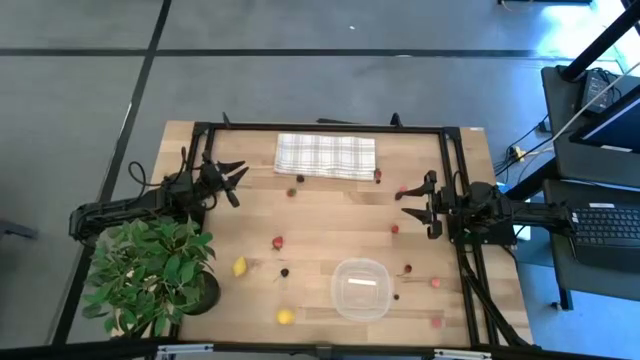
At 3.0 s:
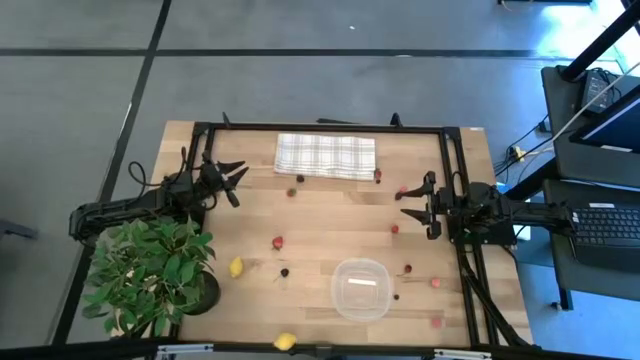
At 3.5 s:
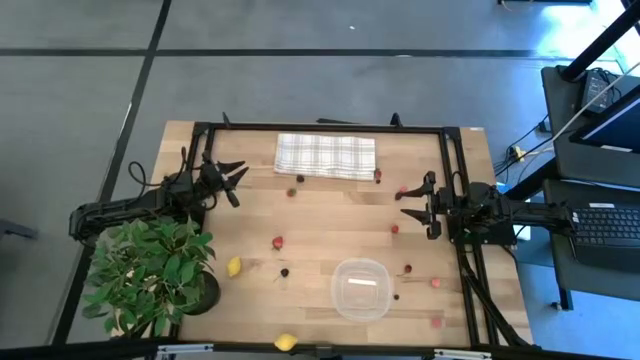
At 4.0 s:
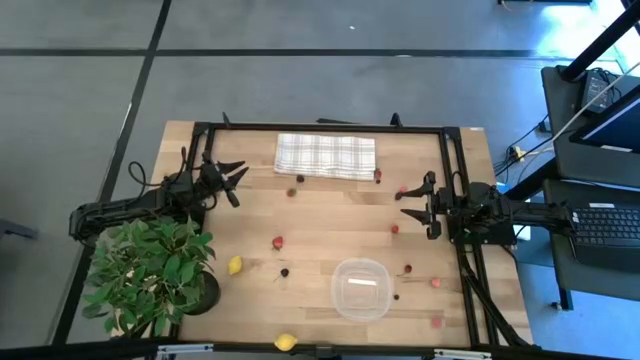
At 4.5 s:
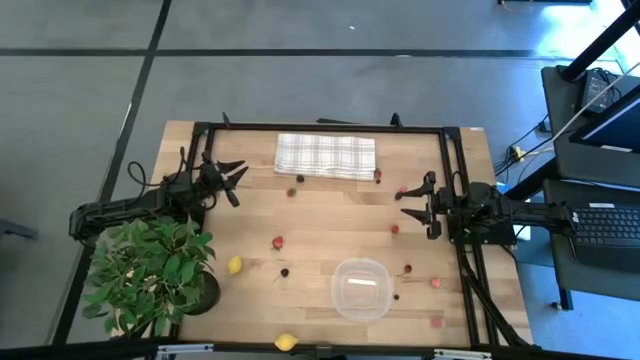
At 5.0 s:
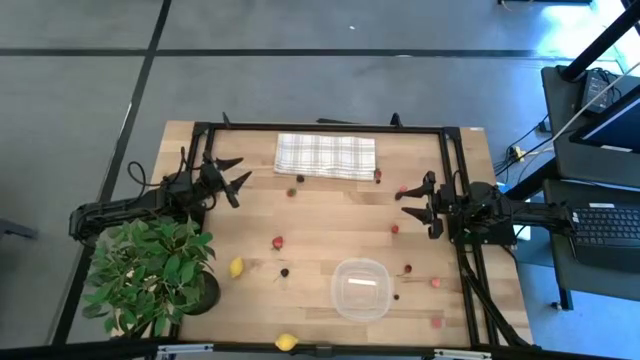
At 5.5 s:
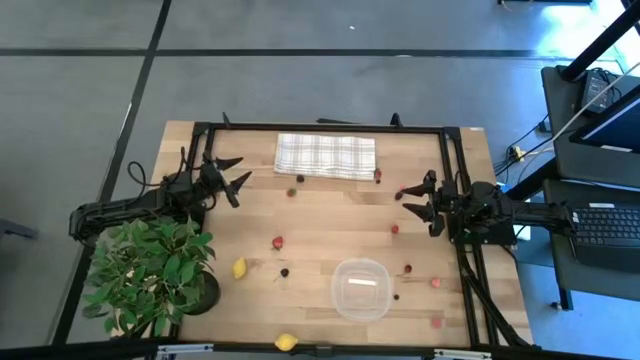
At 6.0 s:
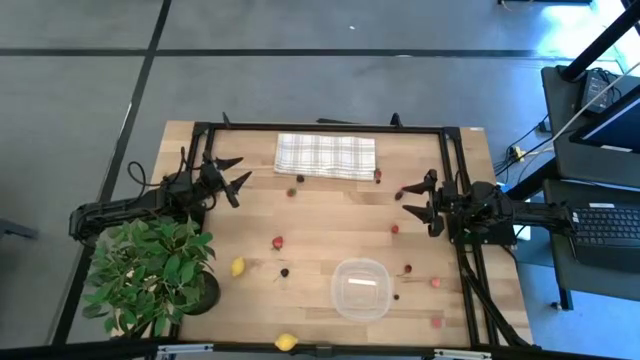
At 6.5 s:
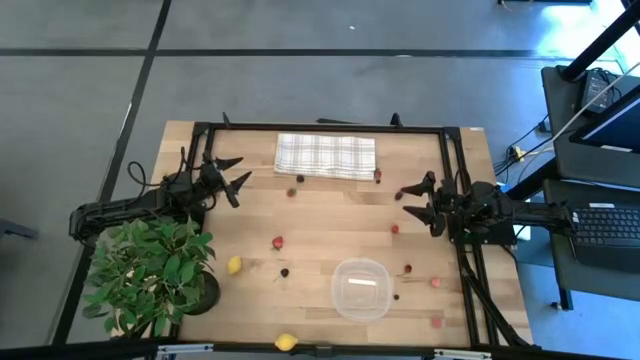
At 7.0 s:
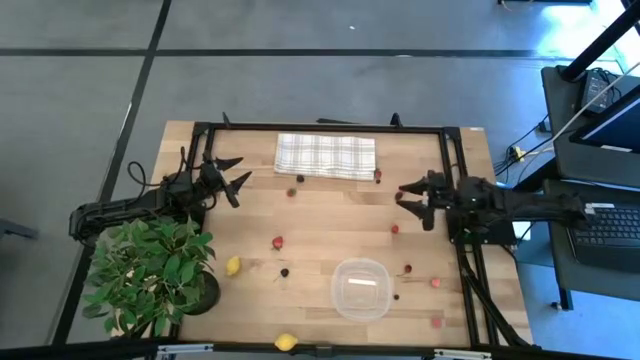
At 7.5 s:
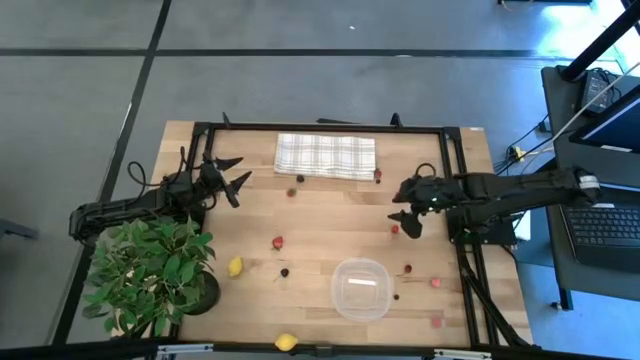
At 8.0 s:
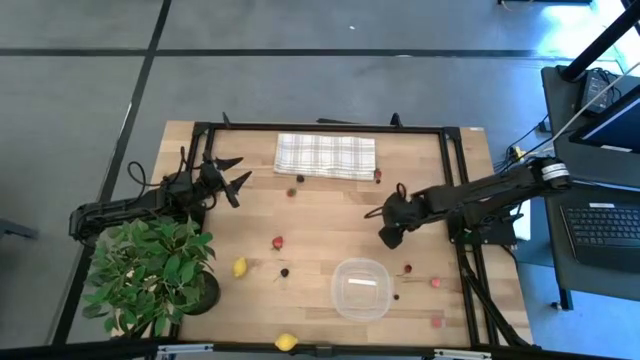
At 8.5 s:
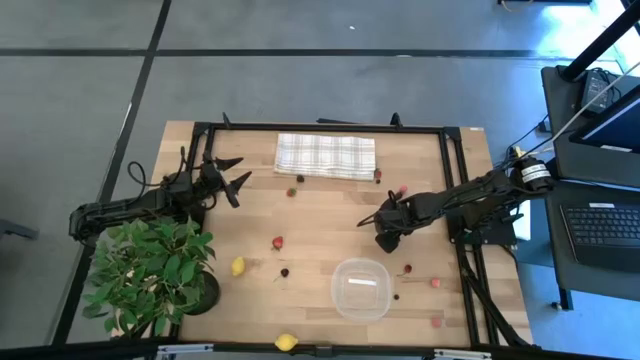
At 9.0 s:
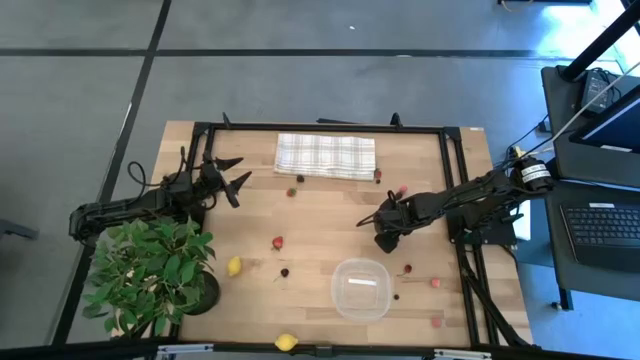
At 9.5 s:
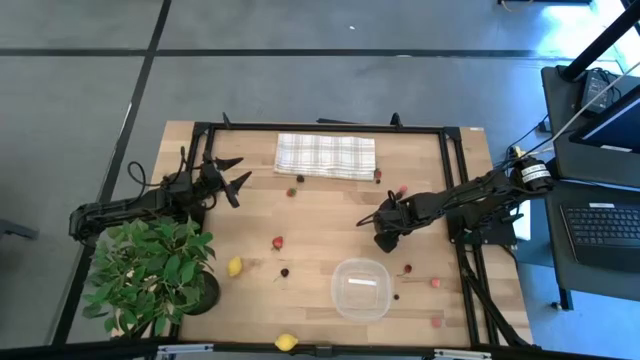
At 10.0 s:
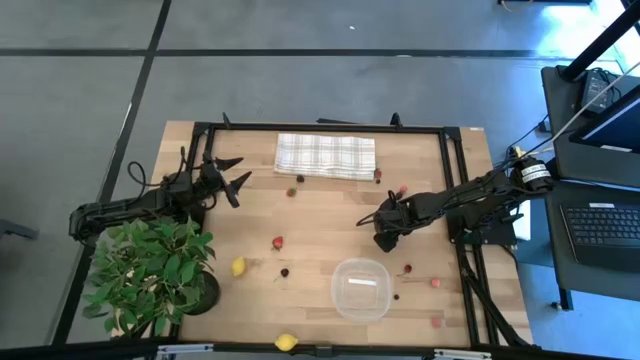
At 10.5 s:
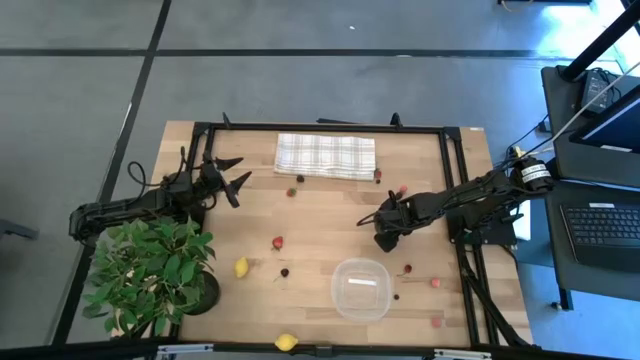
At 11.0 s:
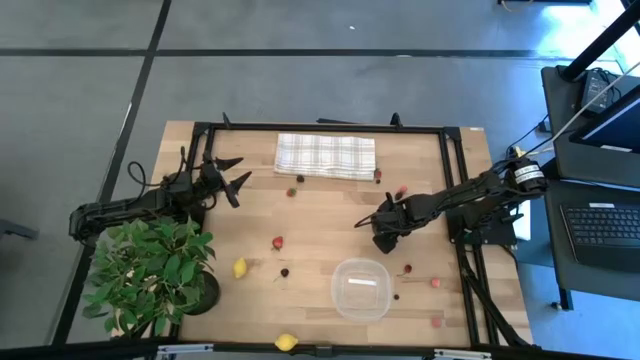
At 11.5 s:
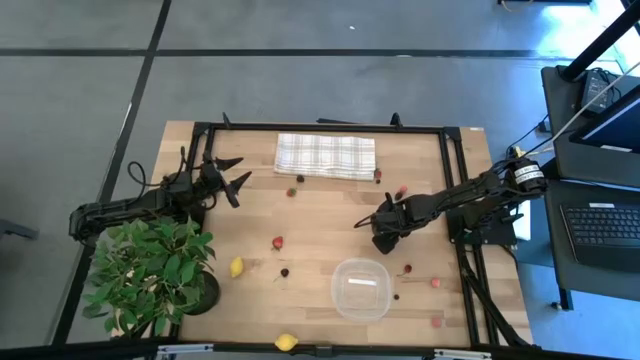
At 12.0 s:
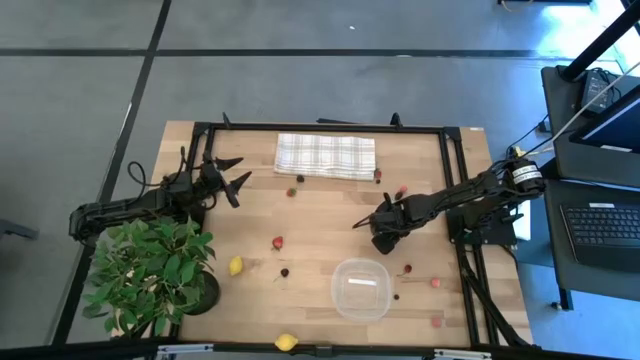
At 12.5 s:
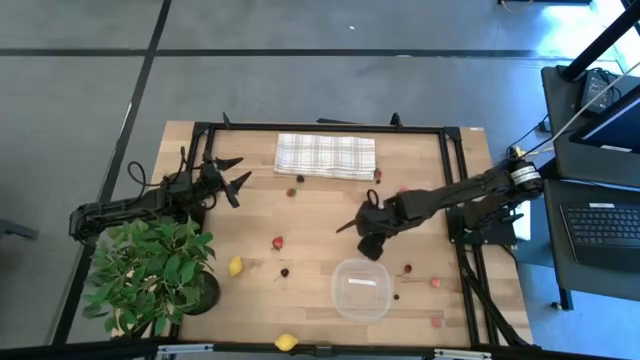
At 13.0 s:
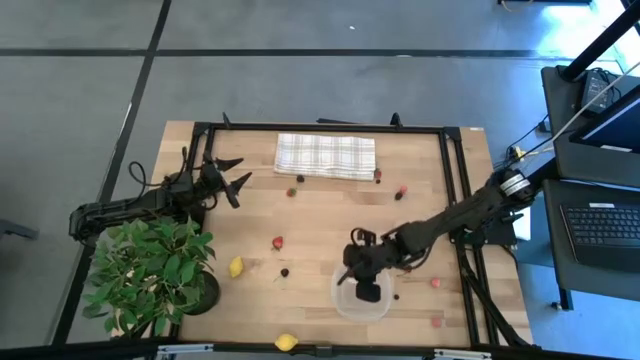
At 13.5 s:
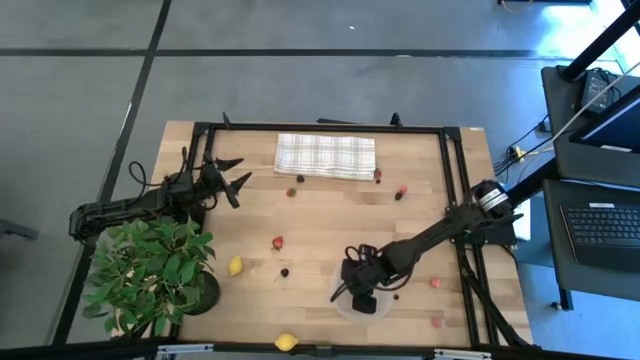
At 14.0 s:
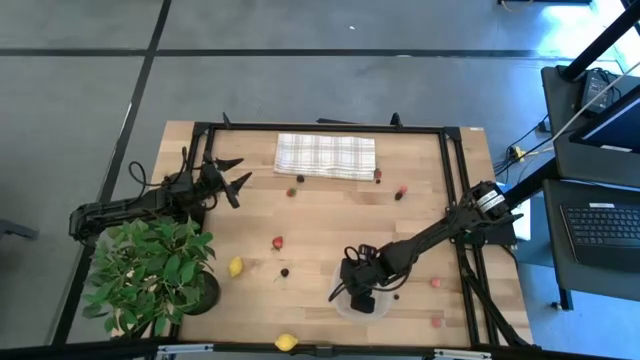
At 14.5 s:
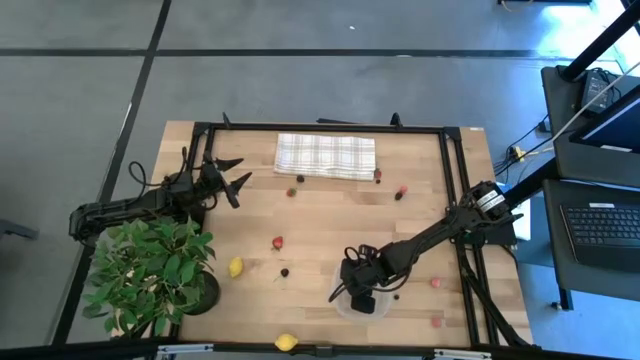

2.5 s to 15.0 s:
Task: Pick and placing Produce into tupperware
Put the red raspberry into the transparent bin

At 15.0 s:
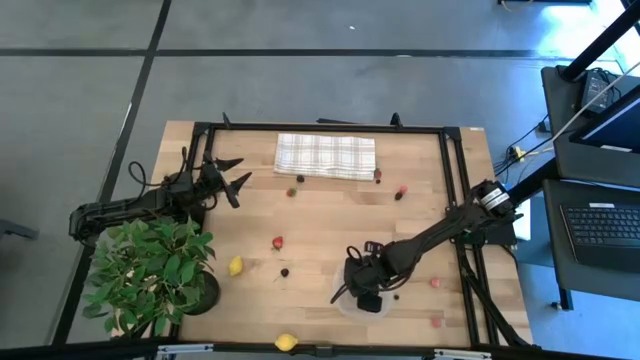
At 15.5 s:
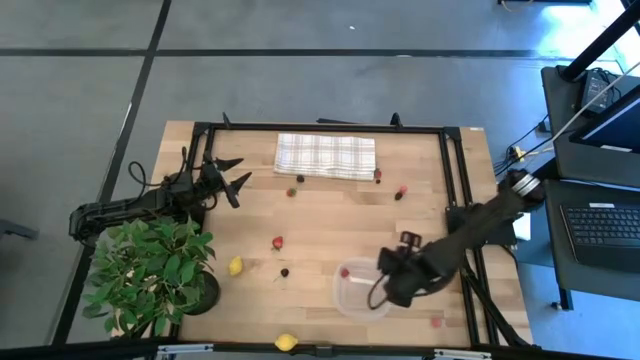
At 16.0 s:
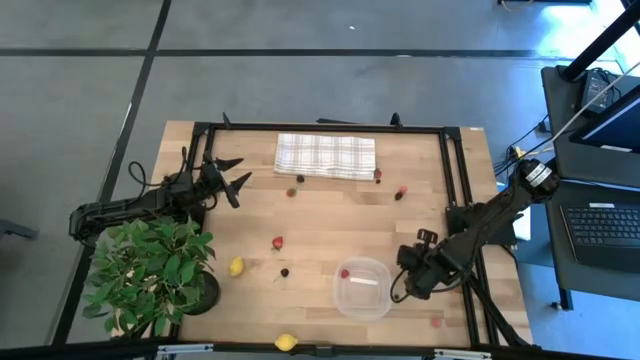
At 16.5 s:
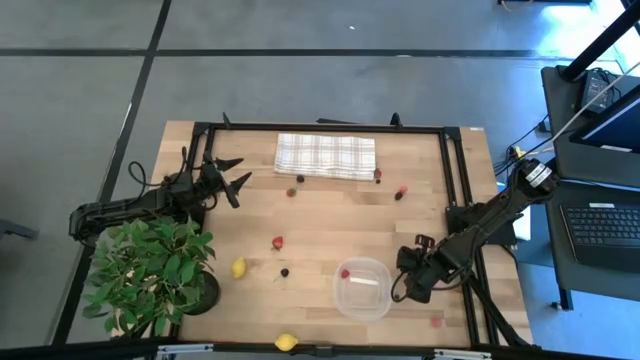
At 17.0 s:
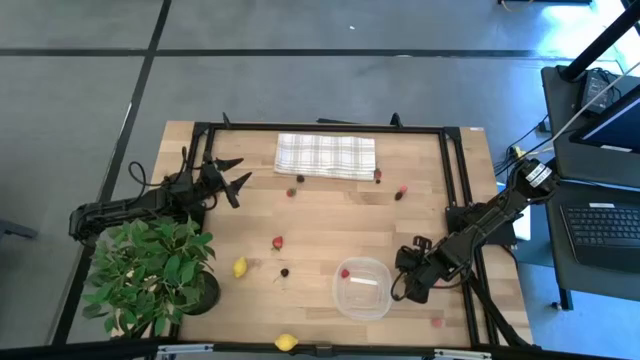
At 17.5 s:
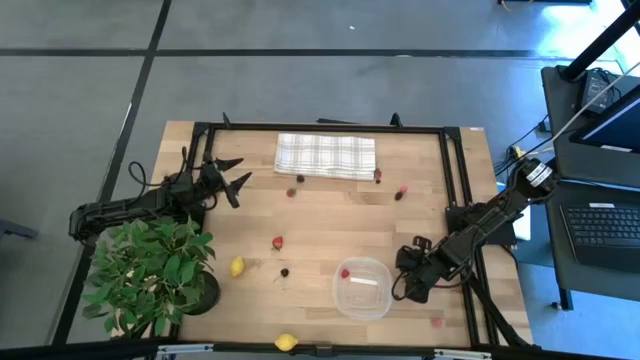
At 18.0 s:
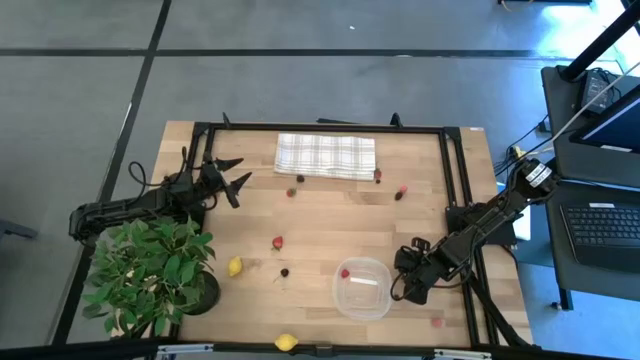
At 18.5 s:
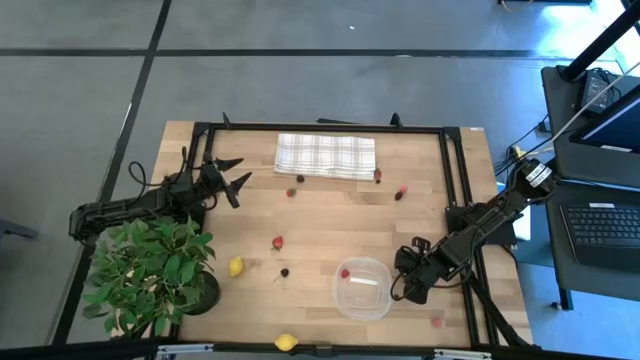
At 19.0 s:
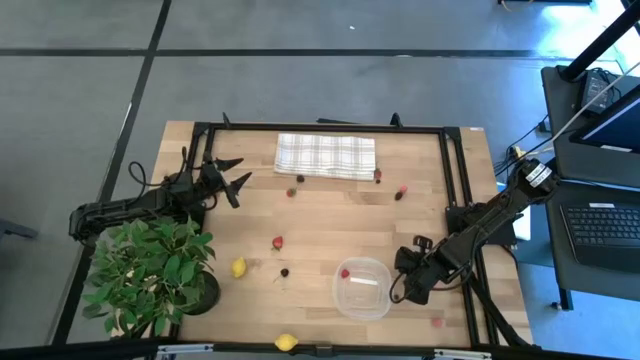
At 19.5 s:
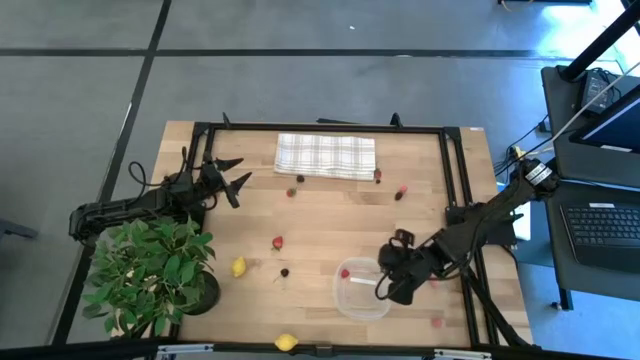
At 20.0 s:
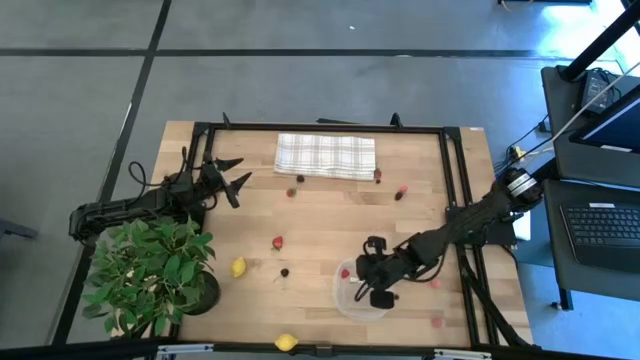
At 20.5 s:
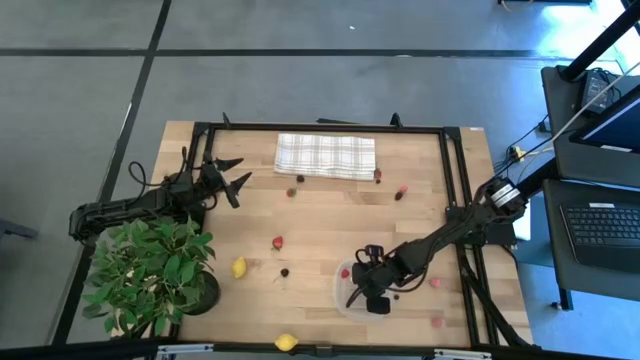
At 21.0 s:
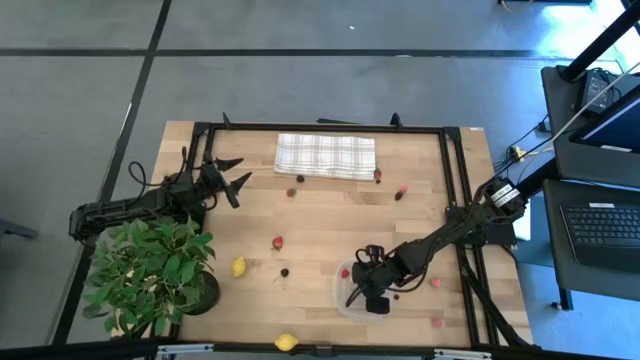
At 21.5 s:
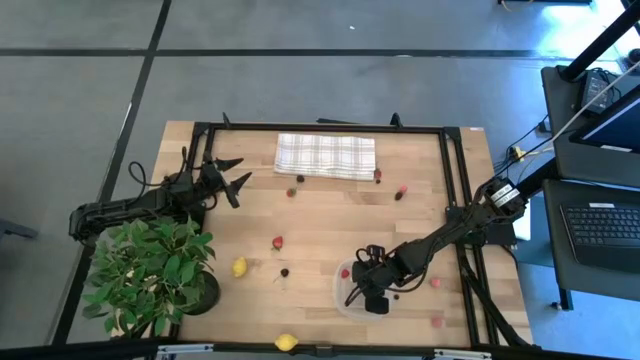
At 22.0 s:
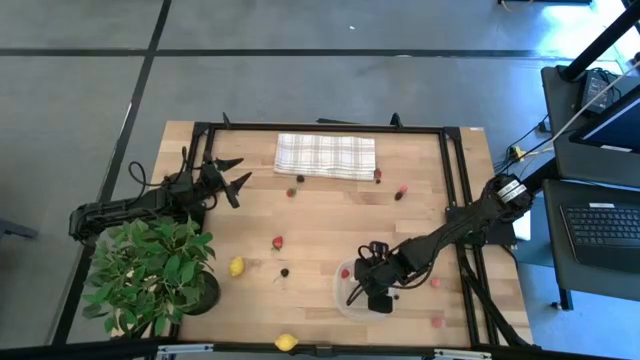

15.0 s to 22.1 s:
Put the red cherry into the transparent bin

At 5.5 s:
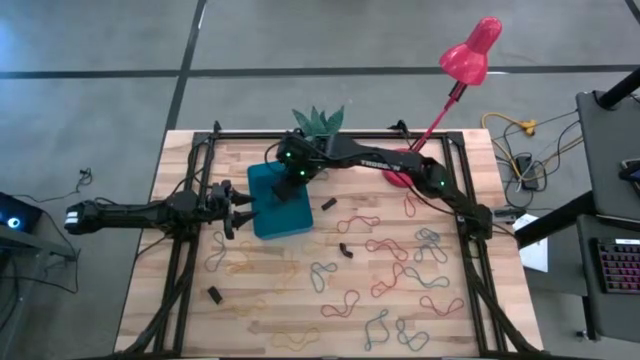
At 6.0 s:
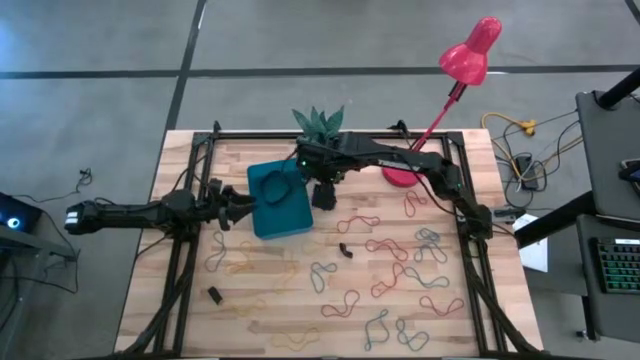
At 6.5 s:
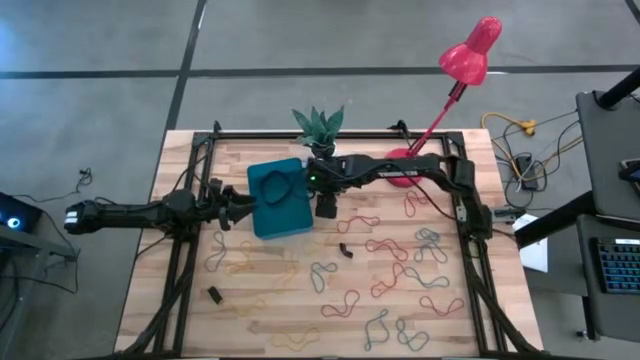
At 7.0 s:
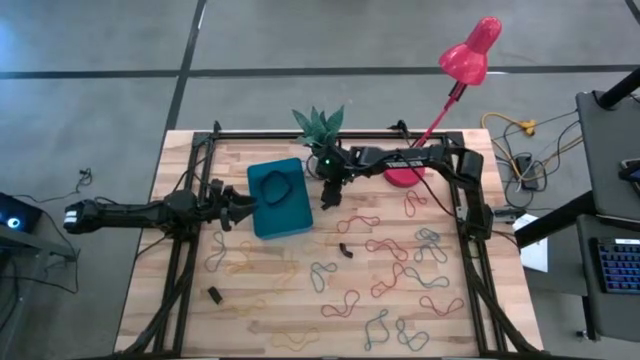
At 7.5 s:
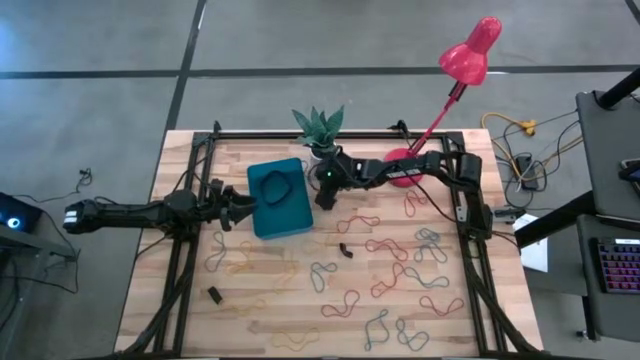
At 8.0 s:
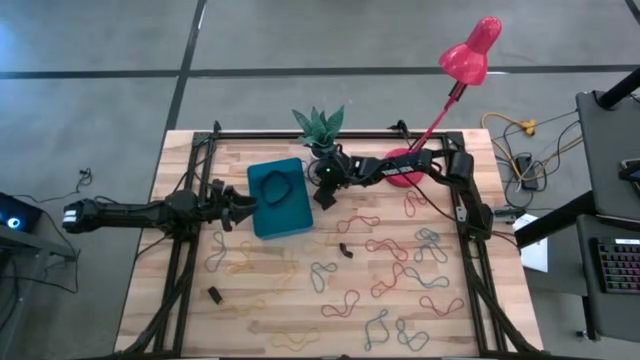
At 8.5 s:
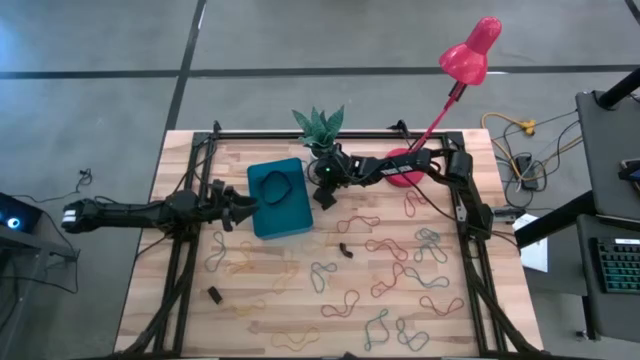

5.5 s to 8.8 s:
Task: Pick and place rubber bands into bin
Put the blue rubber band into the blue bin
